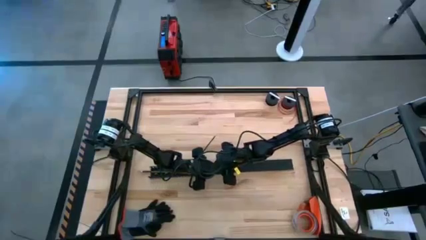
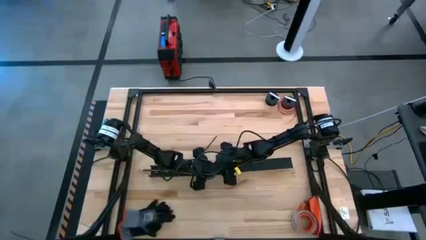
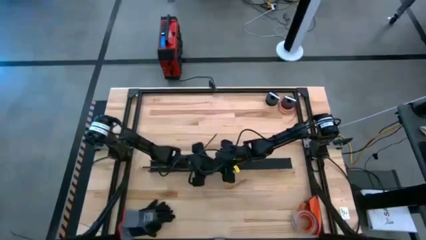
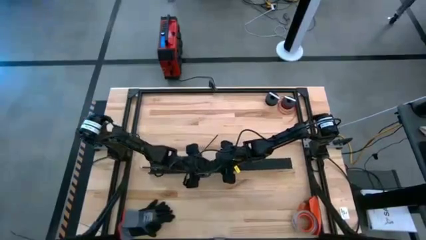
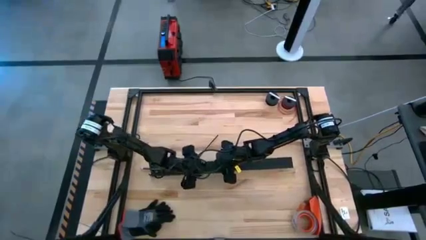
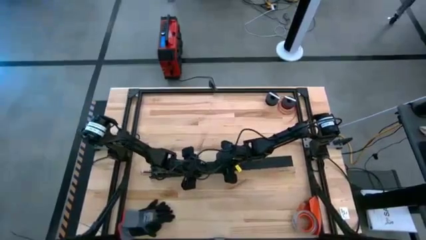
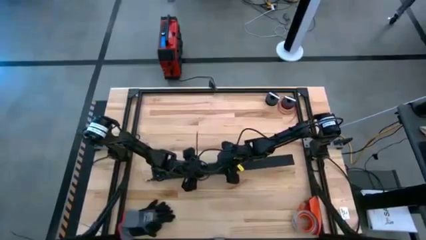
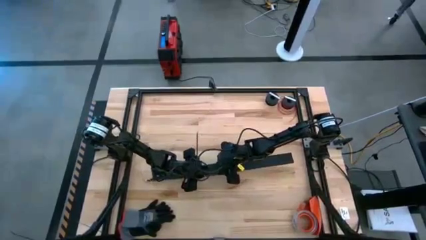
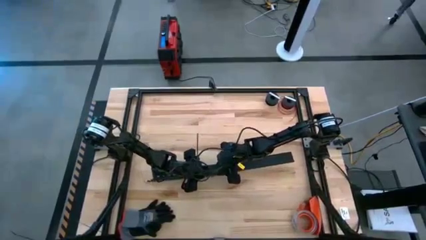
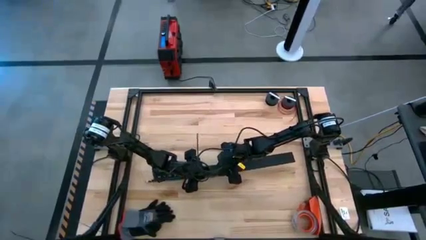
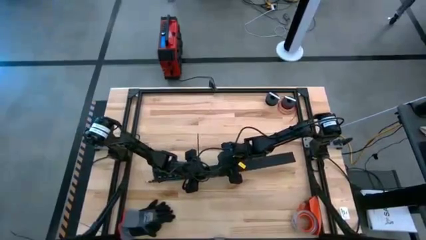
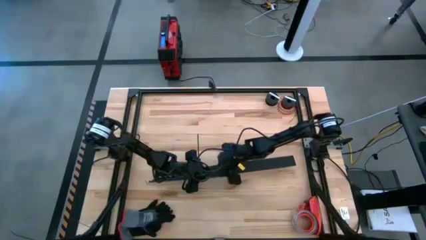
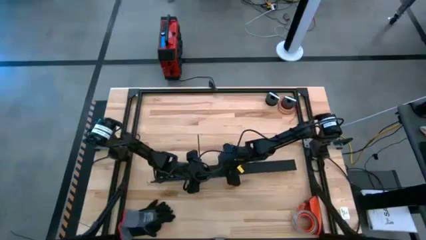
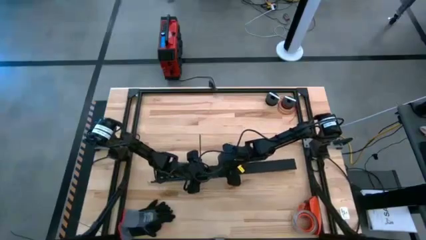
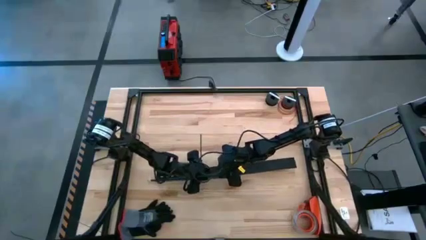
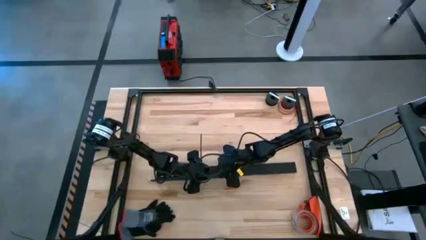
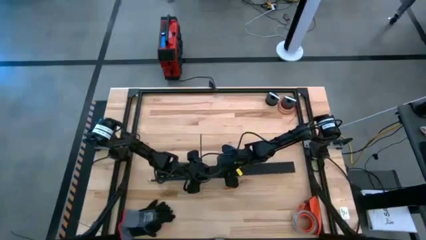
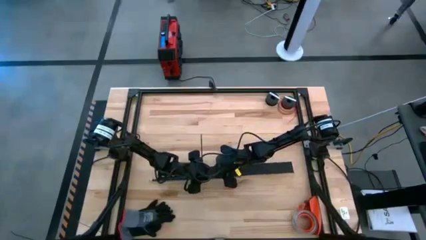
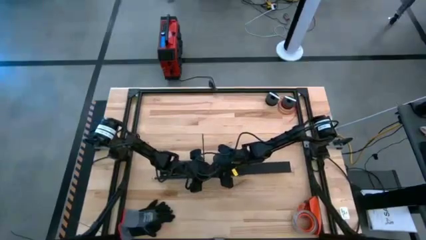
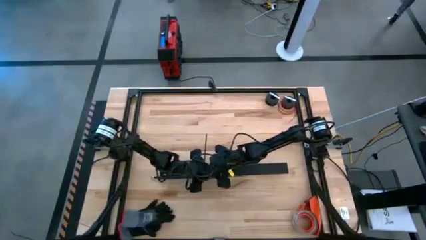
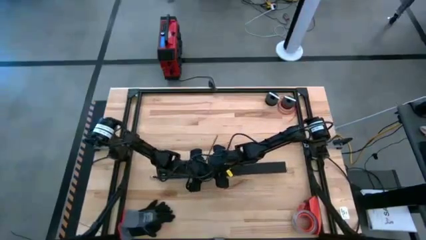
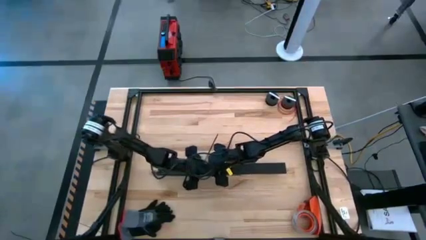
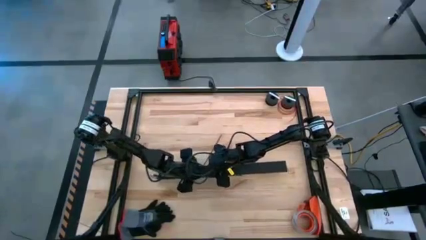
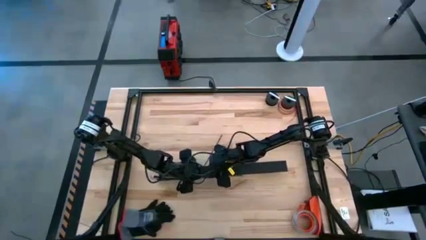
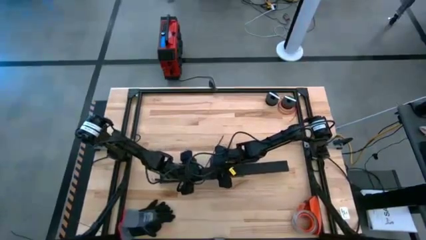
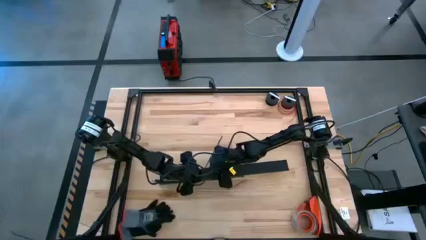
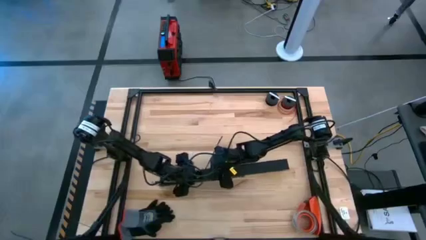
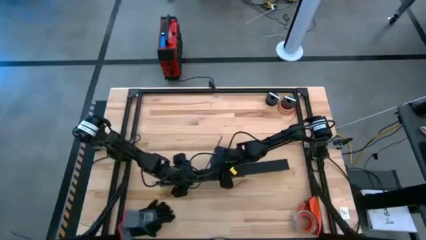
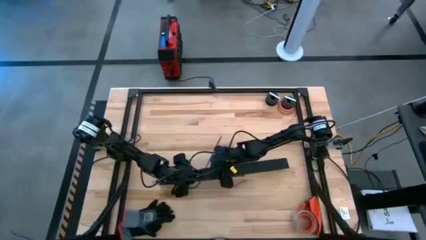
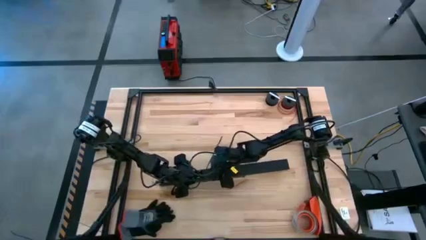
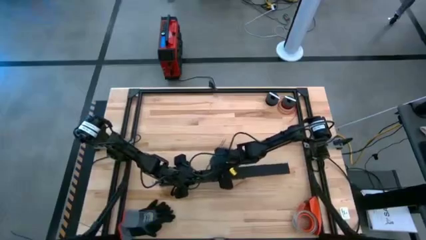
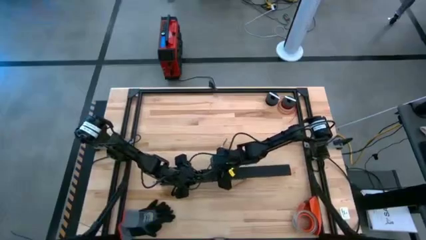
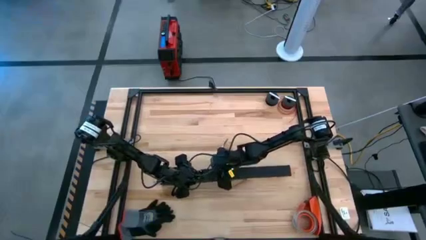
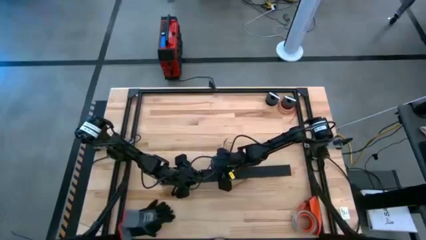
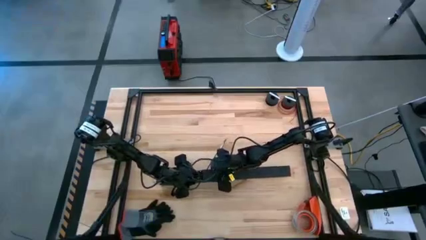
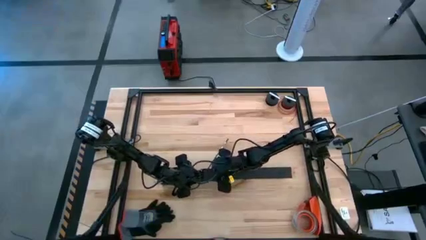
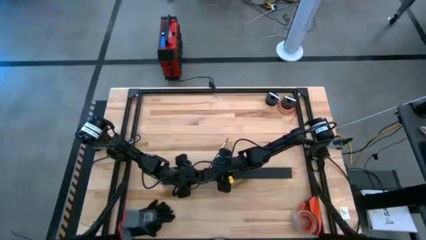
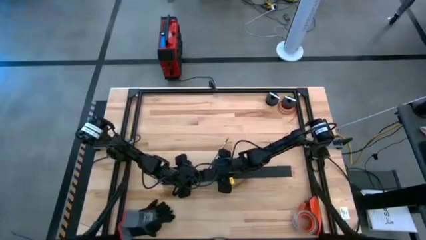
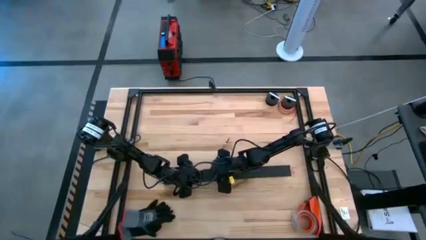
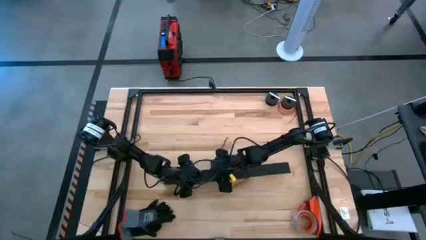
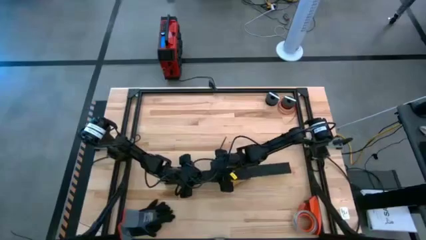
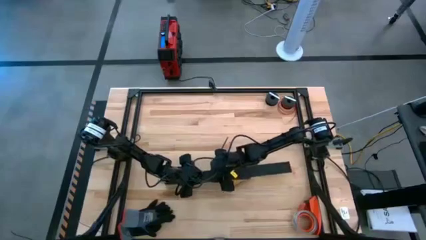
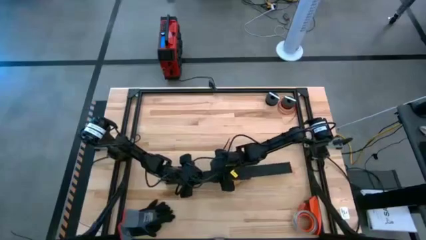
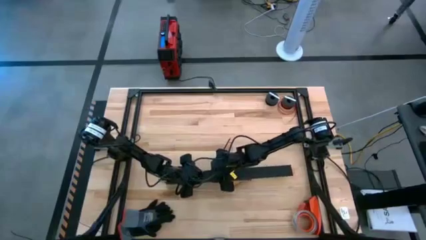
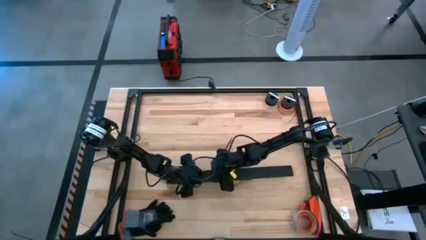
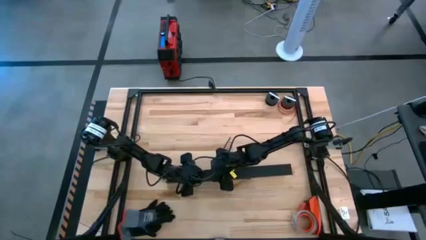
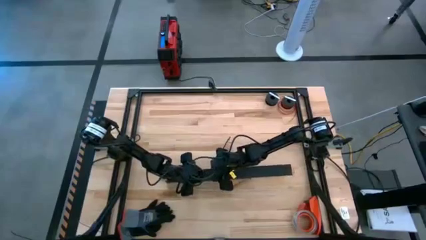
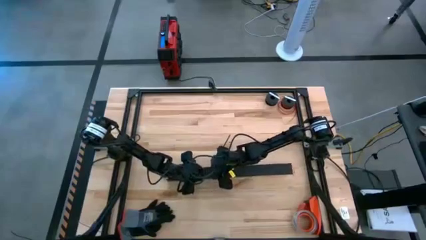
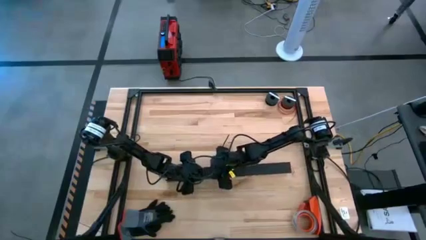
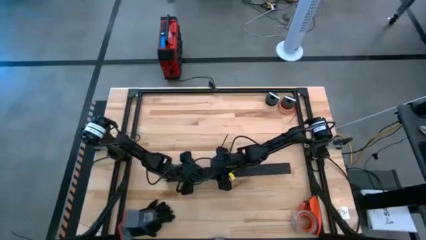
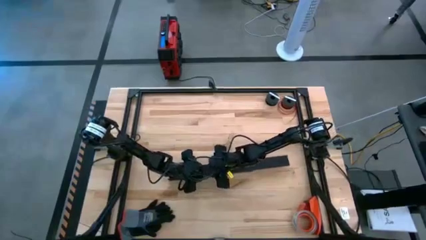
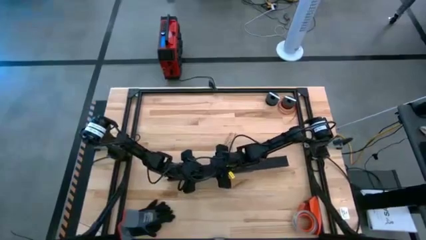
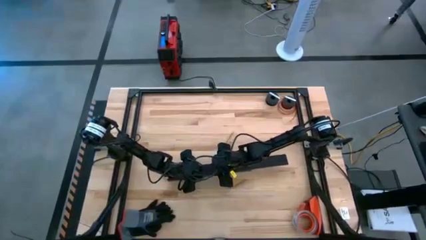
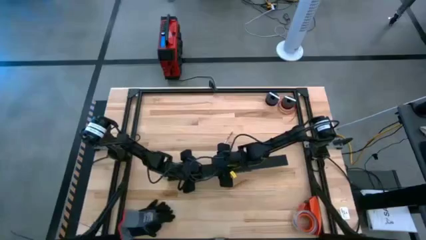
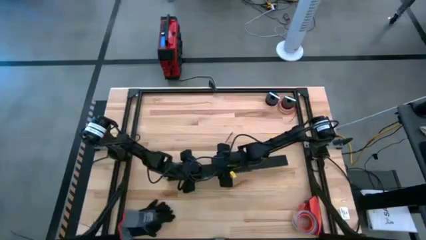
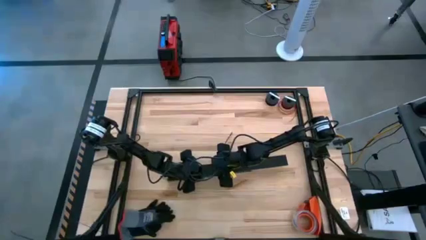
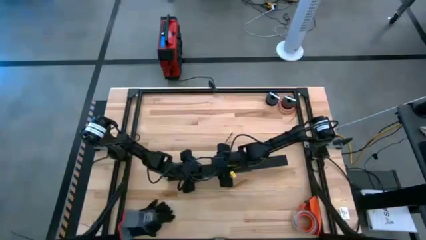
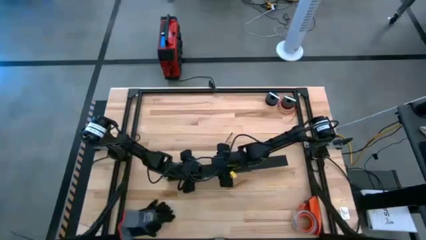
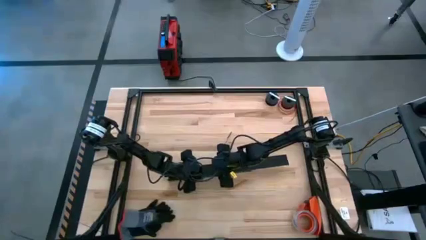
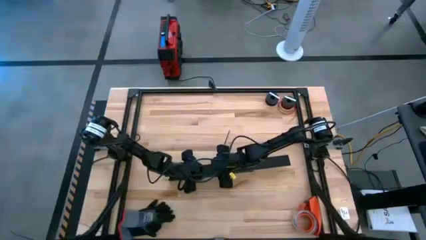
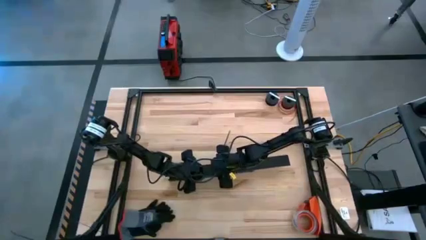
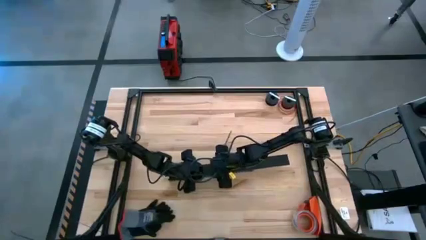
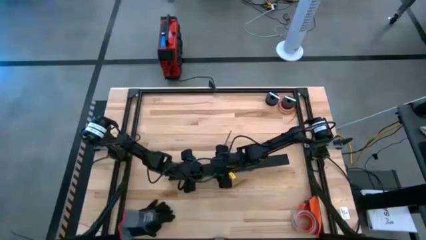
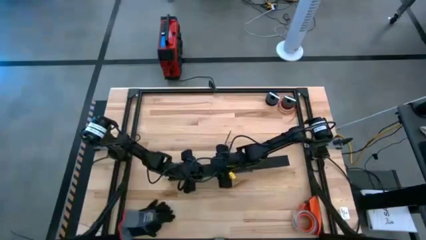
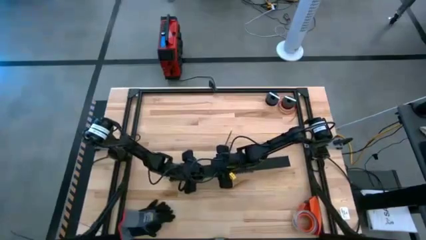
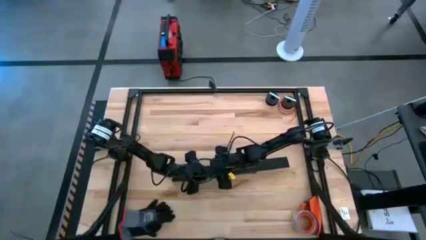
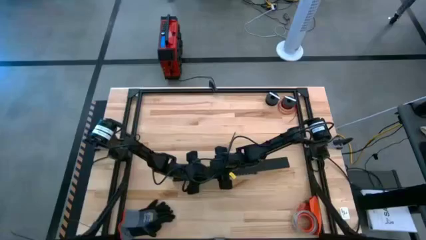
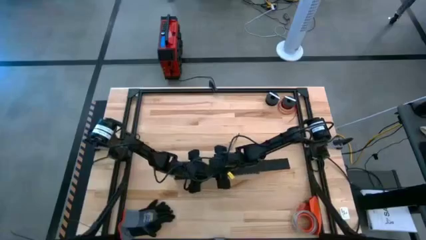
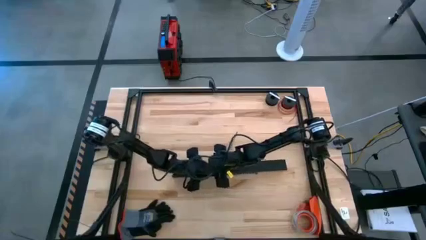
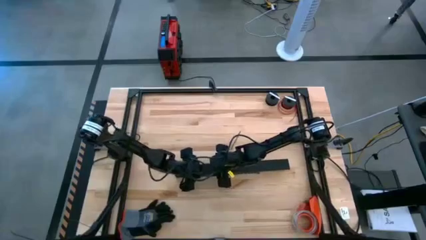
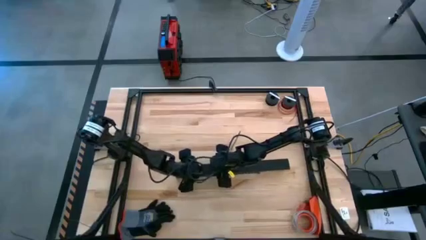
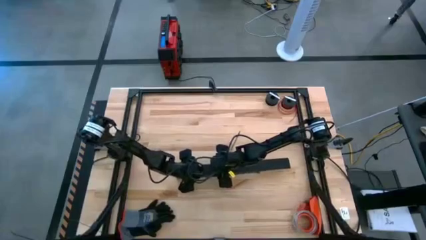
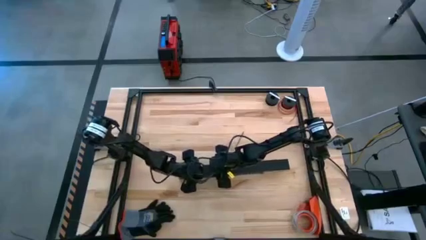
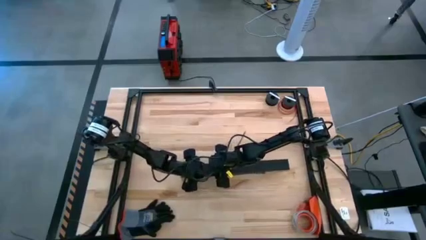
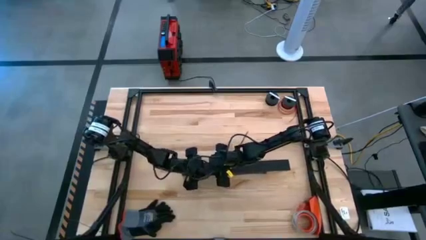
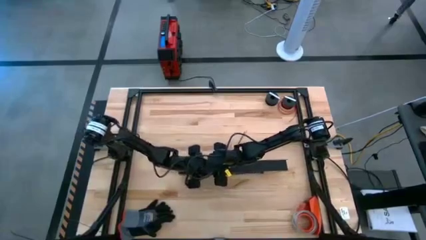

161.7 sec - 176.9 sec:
Task: Ziptie cables
Insert the cable duct cover into the cable duct

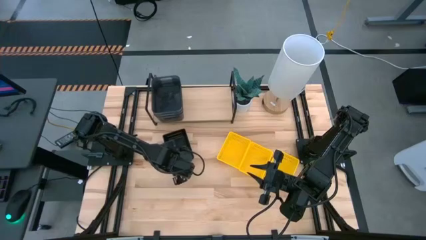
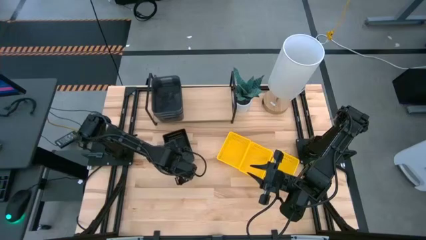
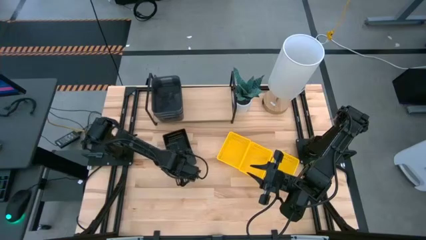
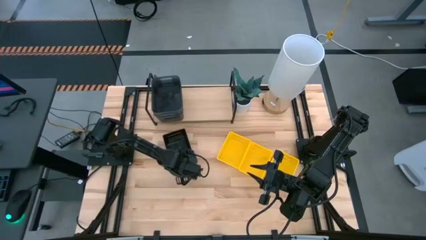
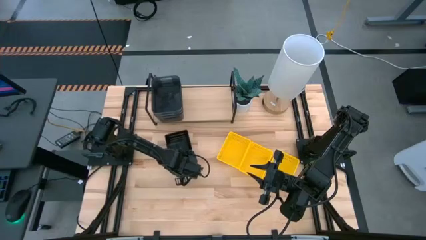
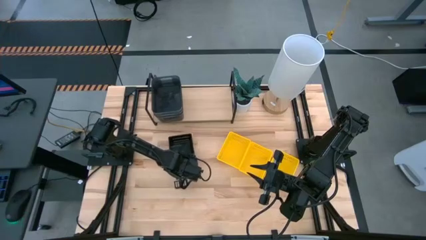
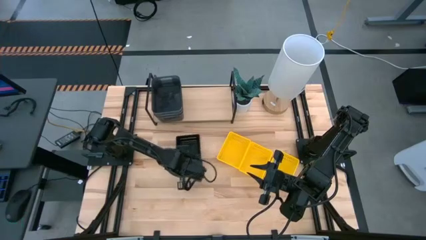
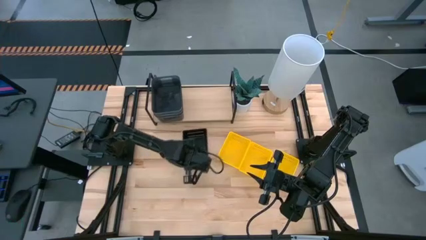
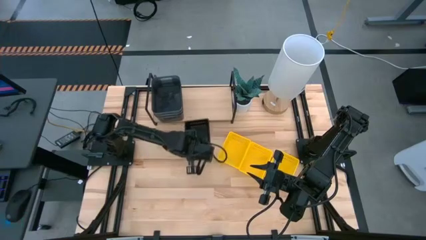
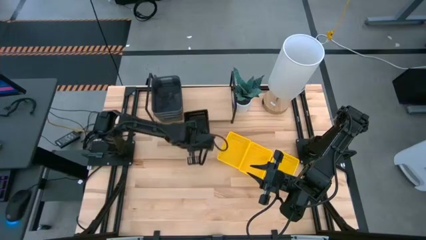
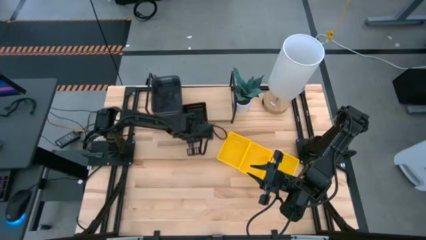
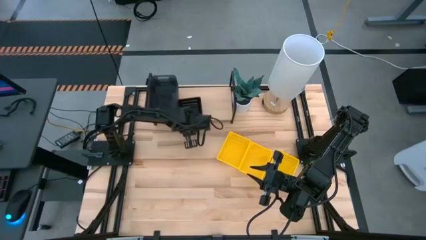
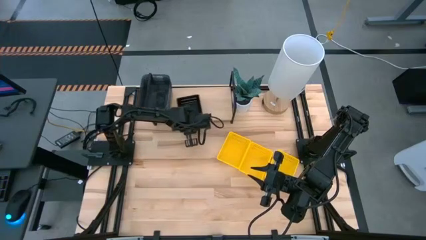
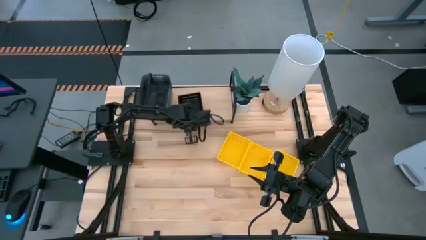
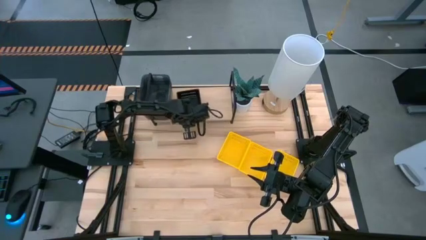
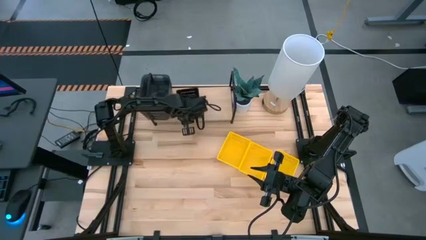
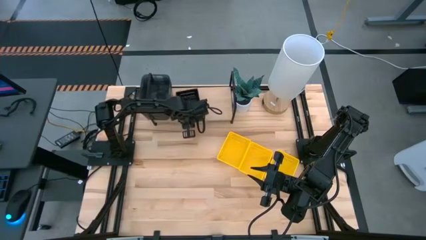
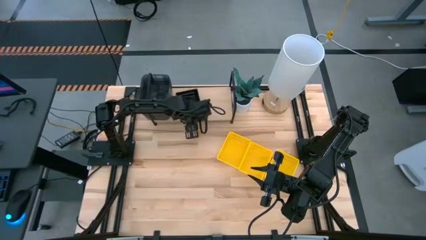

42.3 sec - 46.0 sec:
Task: Stack baskets on shelf by color
Put the stacked black baskets on the shelf
